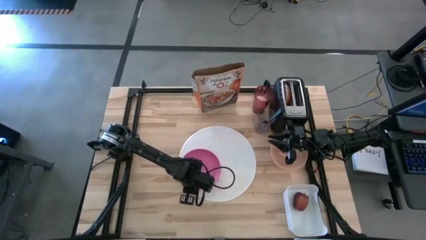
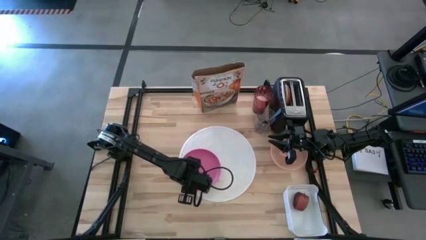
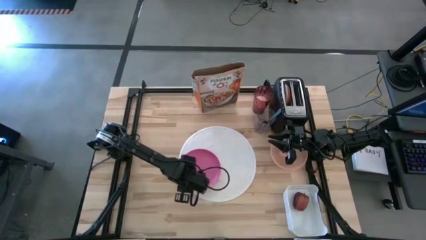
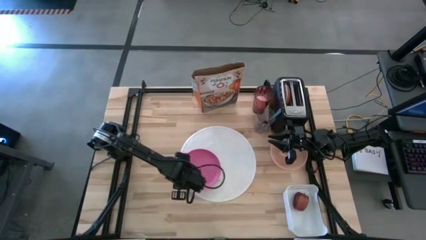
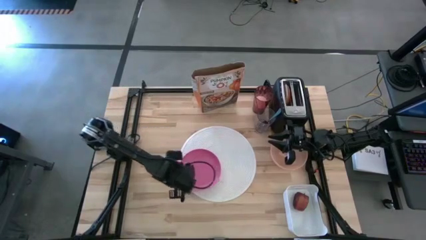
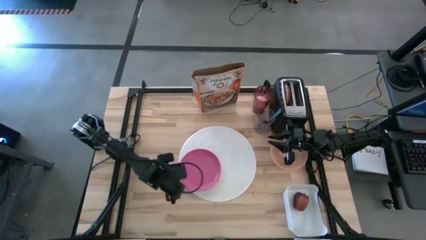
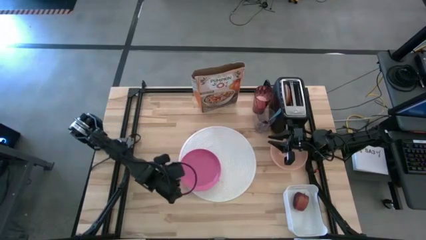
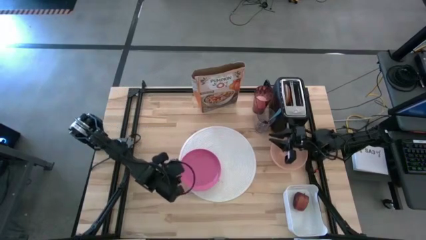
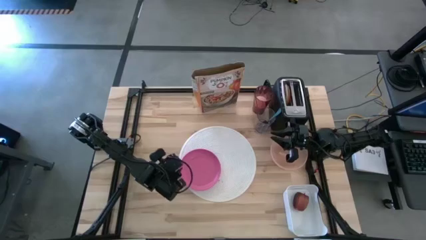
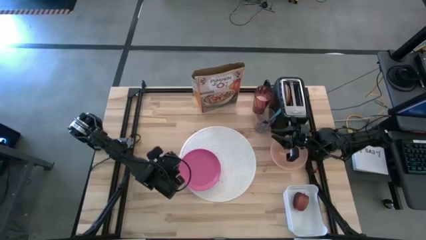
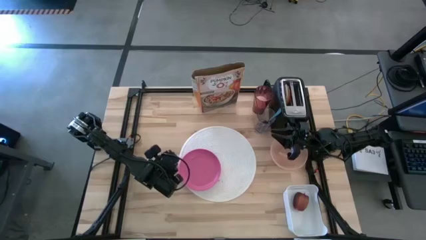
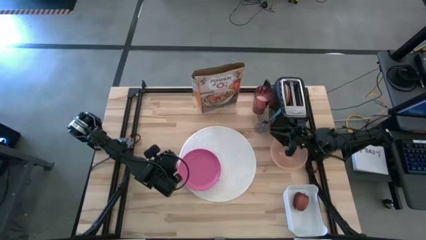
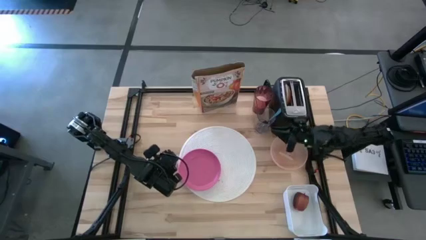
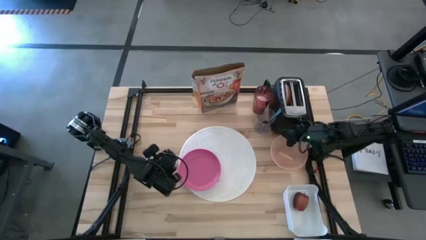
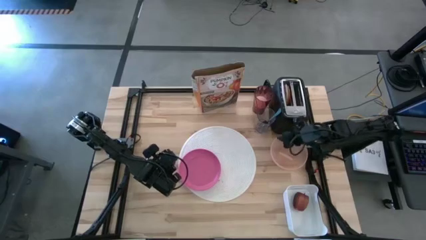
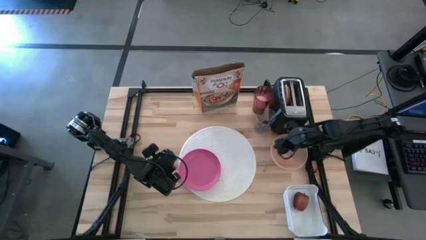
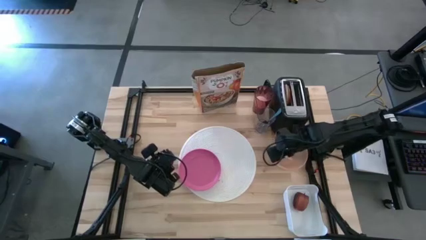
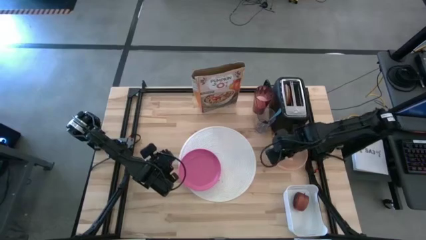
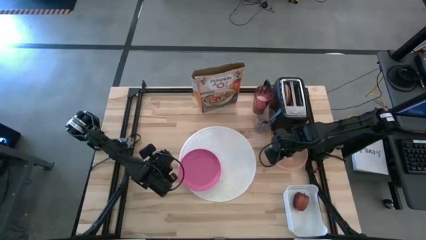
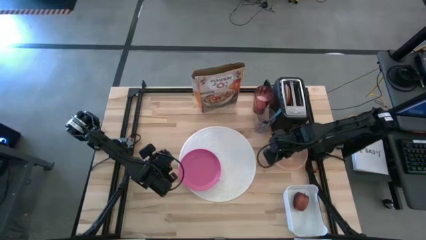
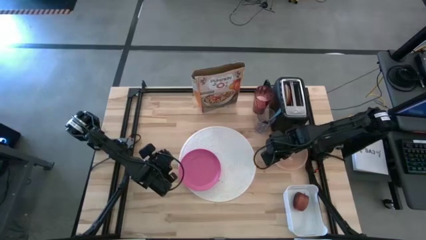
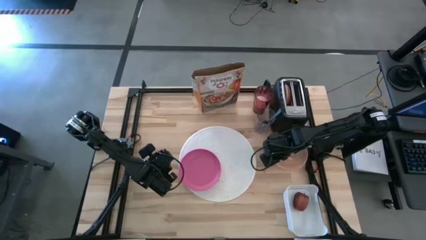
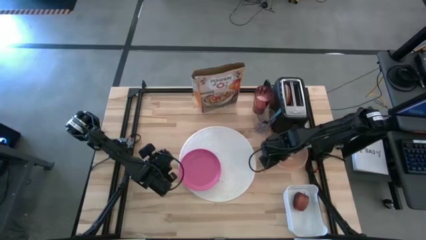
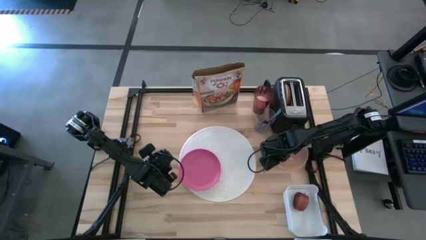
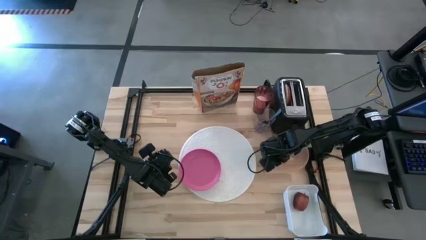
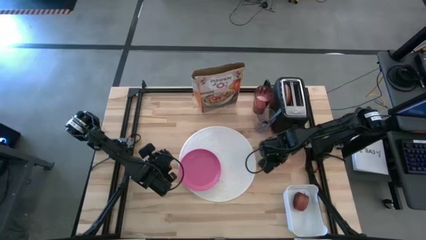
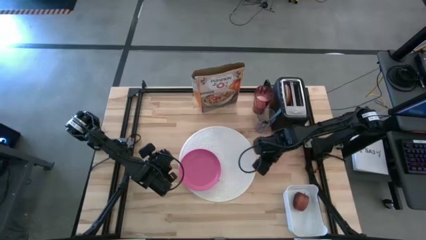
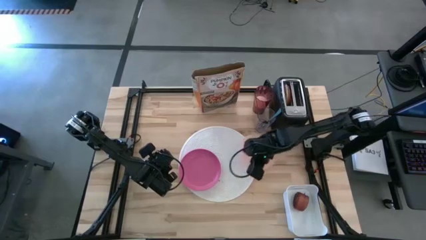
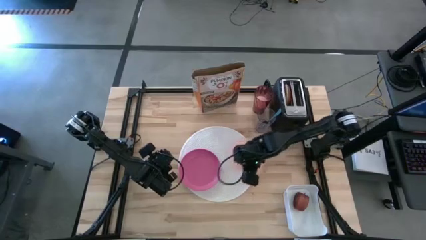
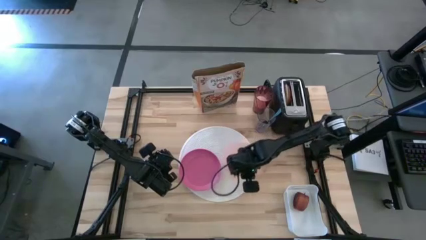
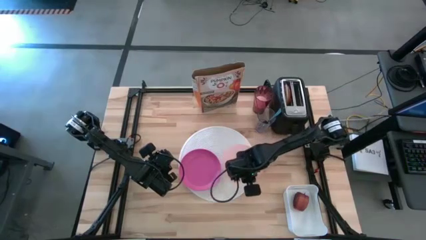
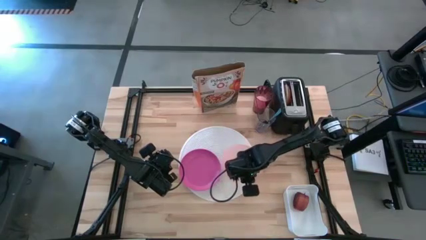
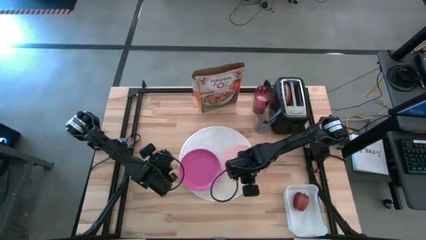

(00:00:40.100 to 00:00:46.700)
Task: Arrange a breakfast setting
Put the orange bowl on the white tablemat to the right of the pink plate

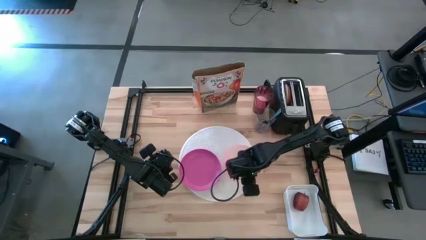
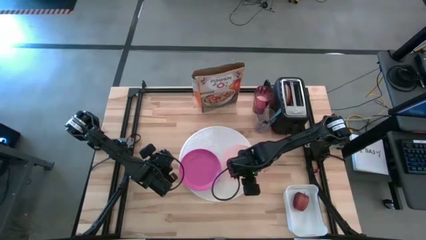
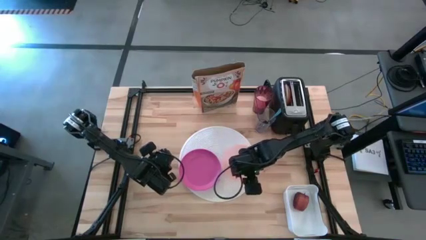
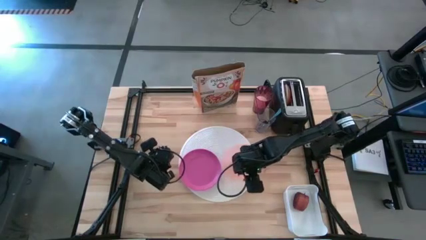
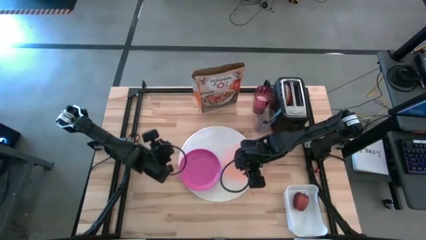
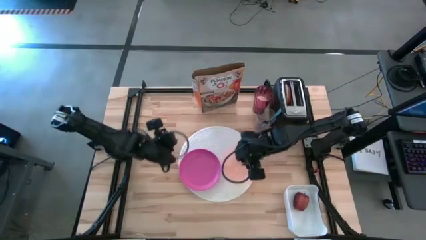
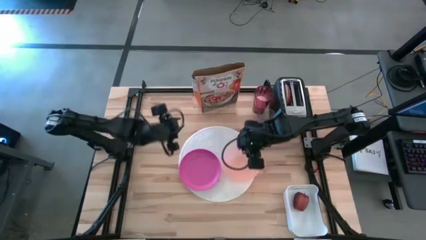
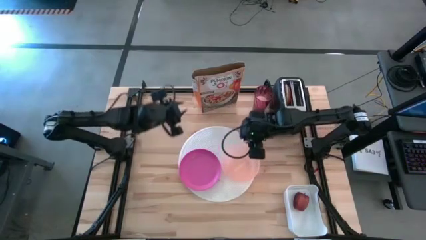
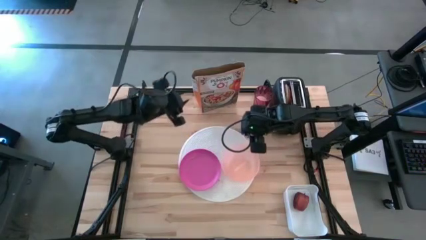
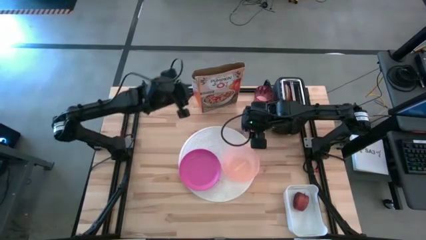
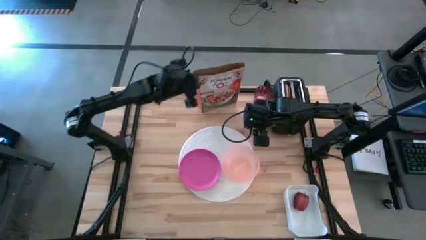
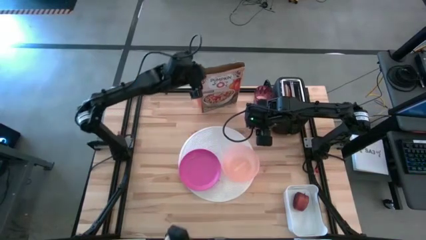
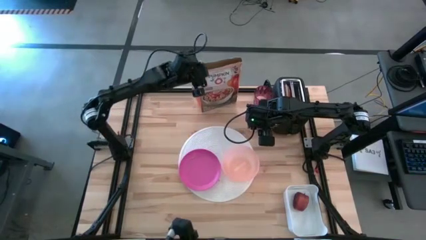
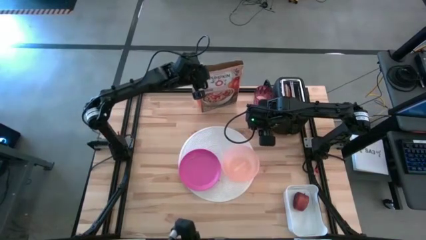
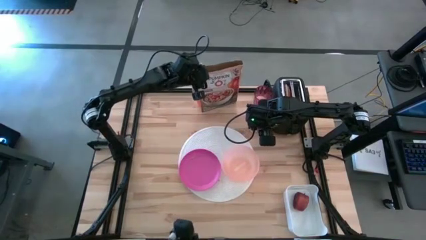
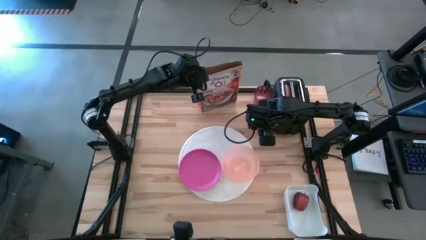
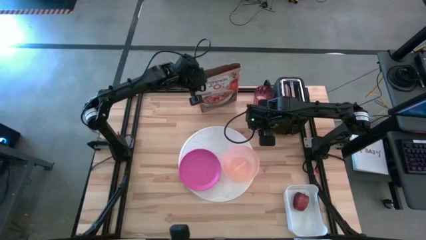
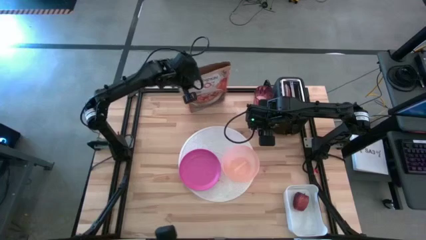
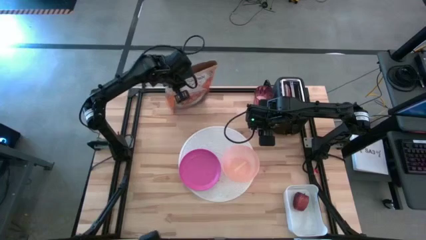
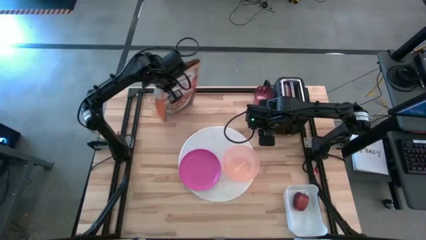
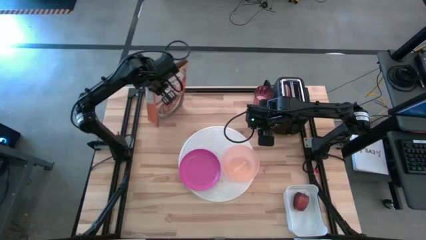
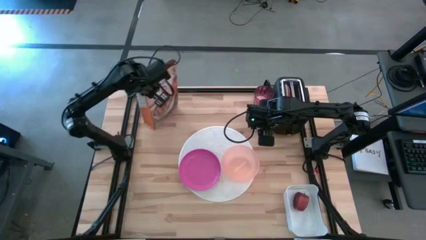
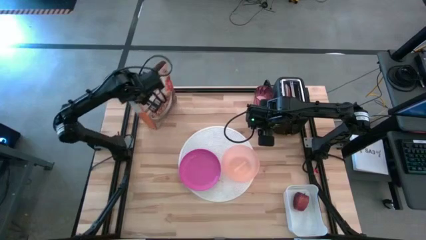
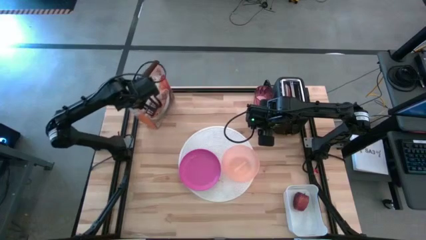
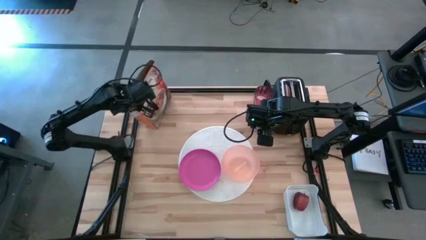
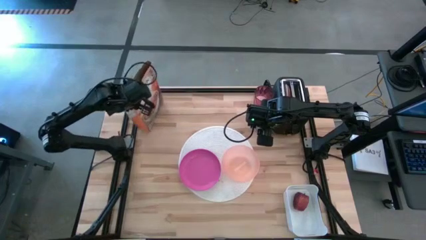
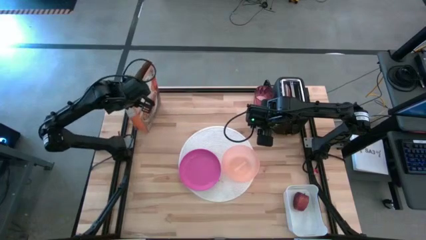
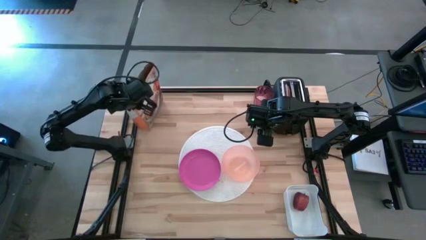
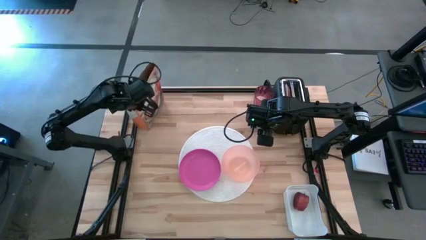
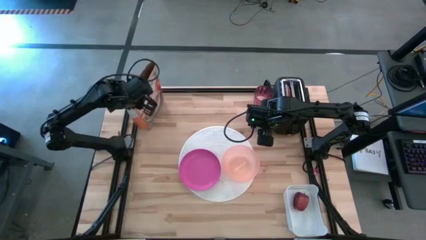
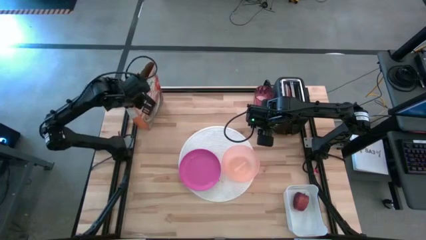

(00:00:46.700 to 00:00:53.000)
Move the cereal box to the top left of the table
